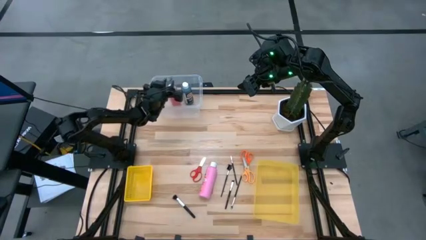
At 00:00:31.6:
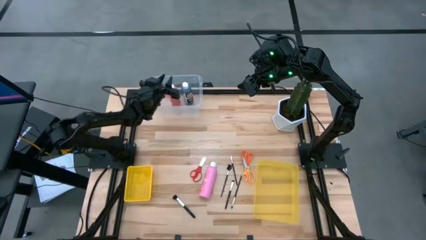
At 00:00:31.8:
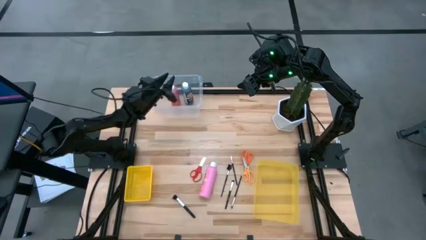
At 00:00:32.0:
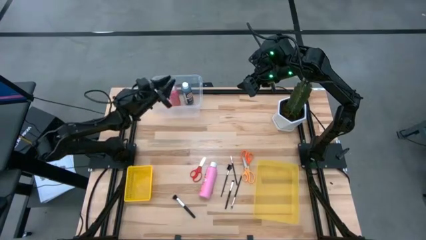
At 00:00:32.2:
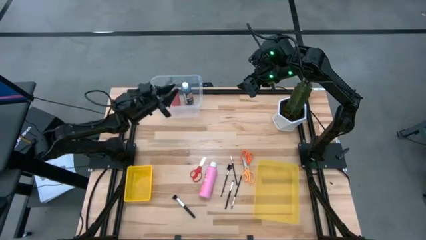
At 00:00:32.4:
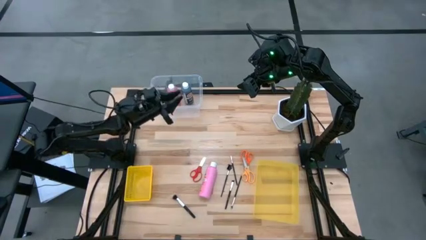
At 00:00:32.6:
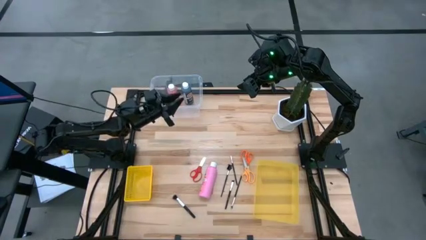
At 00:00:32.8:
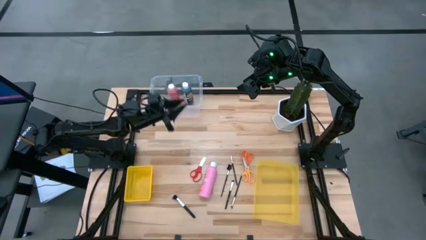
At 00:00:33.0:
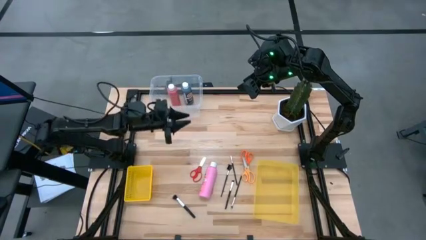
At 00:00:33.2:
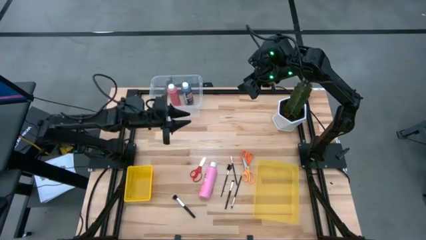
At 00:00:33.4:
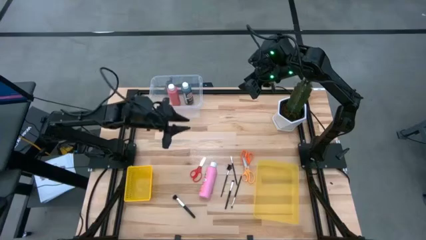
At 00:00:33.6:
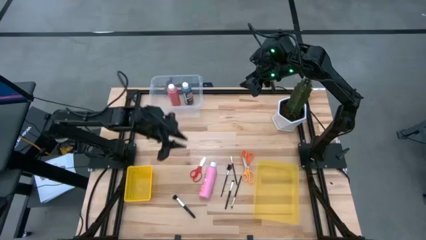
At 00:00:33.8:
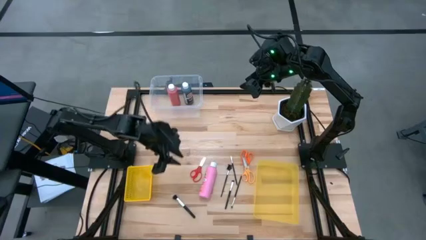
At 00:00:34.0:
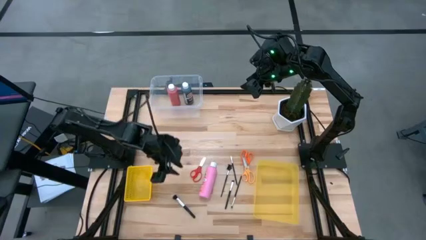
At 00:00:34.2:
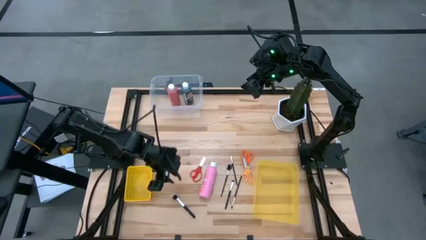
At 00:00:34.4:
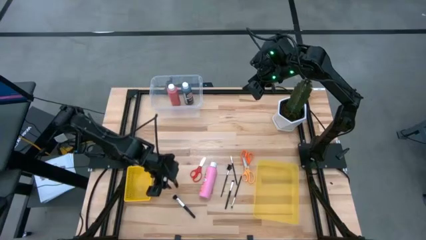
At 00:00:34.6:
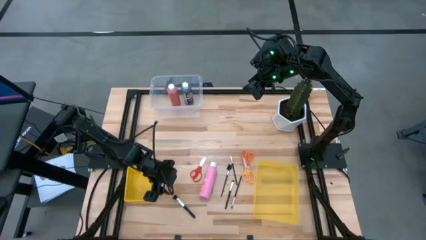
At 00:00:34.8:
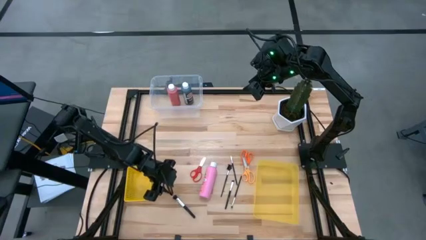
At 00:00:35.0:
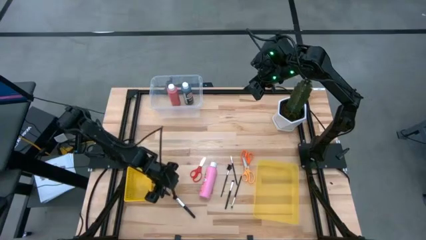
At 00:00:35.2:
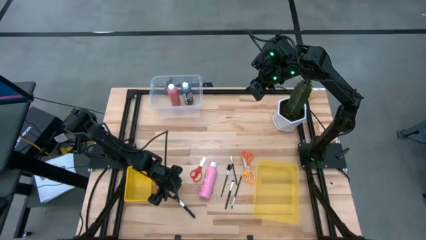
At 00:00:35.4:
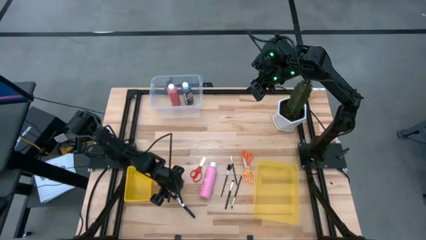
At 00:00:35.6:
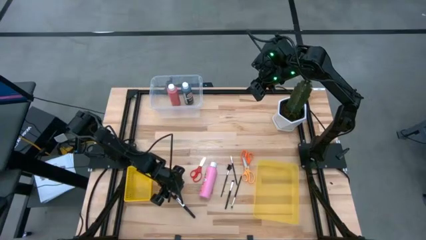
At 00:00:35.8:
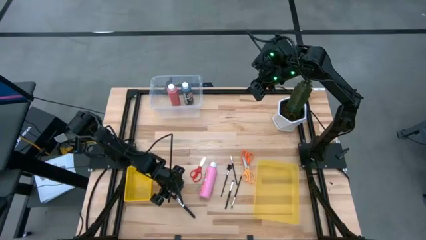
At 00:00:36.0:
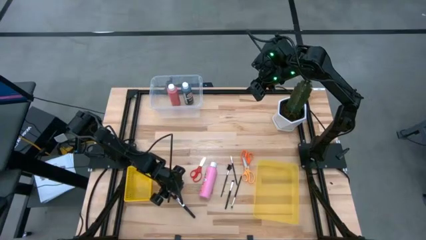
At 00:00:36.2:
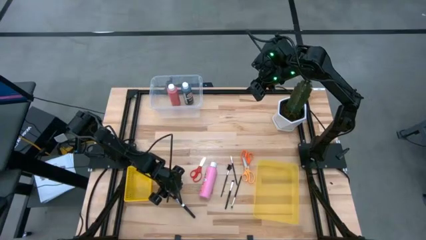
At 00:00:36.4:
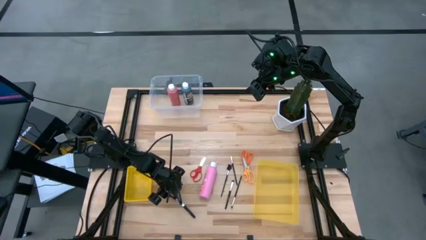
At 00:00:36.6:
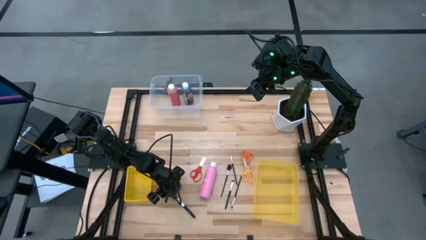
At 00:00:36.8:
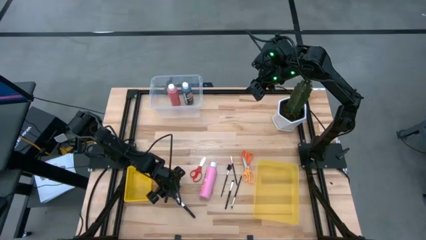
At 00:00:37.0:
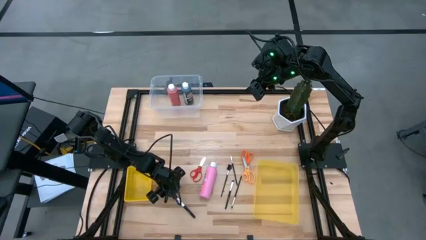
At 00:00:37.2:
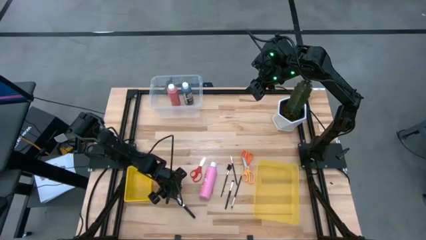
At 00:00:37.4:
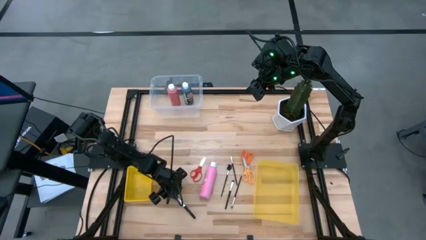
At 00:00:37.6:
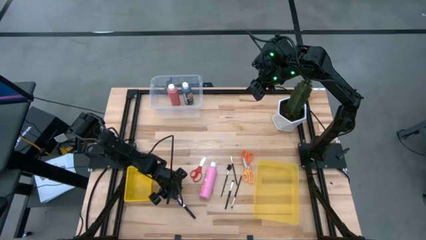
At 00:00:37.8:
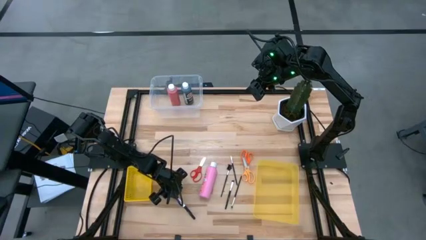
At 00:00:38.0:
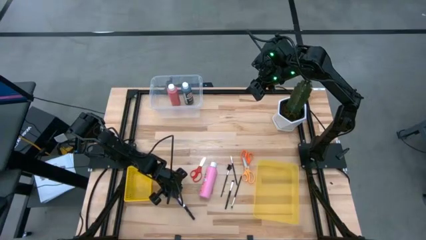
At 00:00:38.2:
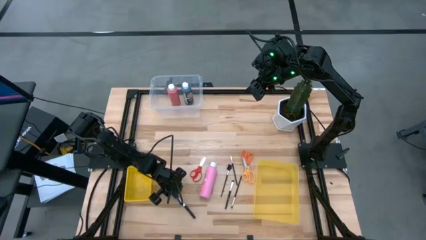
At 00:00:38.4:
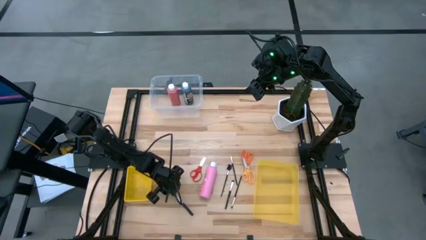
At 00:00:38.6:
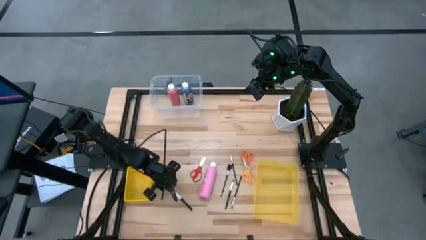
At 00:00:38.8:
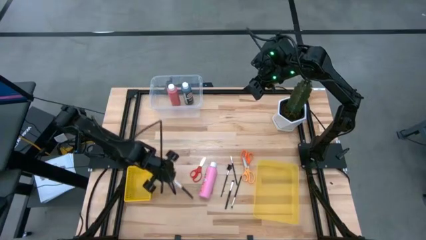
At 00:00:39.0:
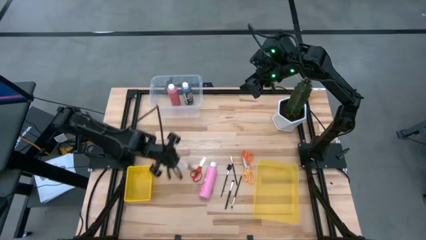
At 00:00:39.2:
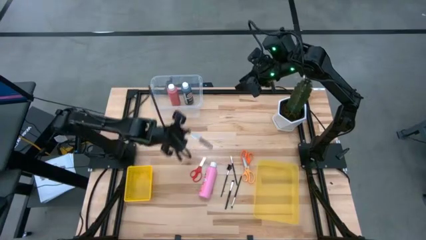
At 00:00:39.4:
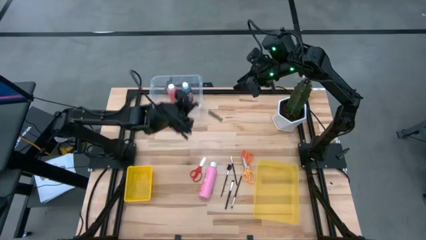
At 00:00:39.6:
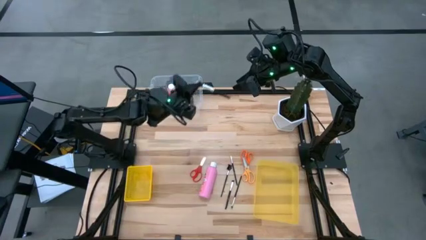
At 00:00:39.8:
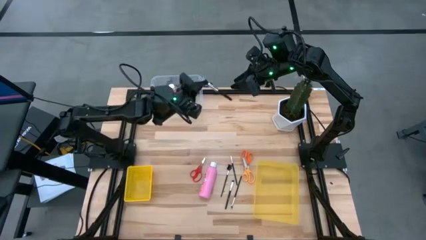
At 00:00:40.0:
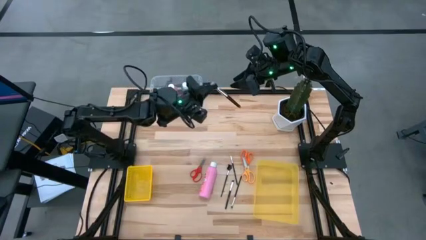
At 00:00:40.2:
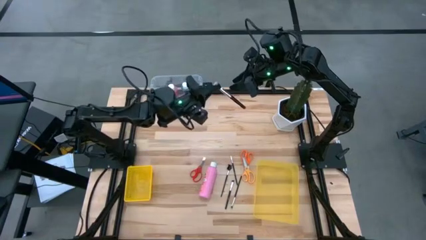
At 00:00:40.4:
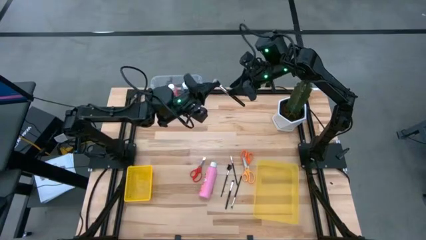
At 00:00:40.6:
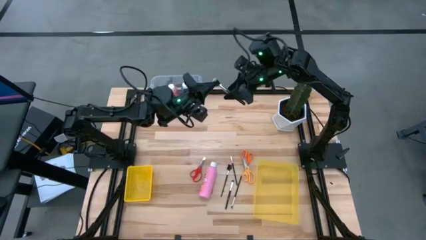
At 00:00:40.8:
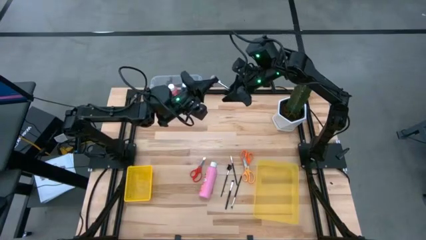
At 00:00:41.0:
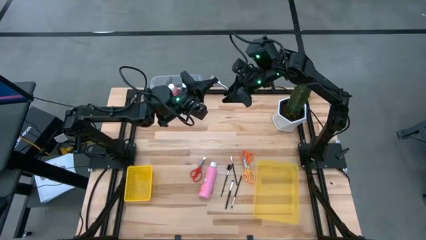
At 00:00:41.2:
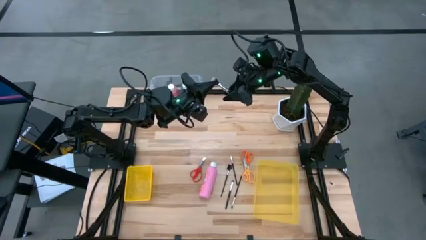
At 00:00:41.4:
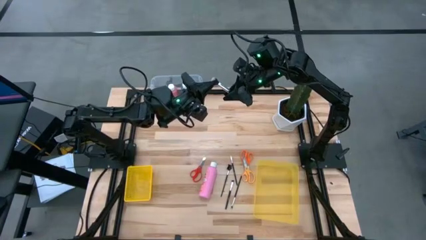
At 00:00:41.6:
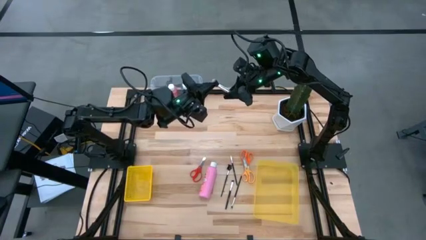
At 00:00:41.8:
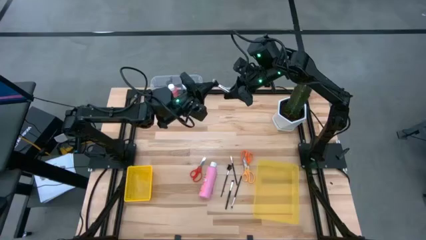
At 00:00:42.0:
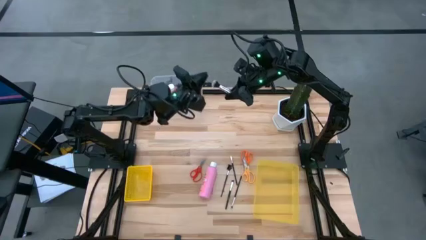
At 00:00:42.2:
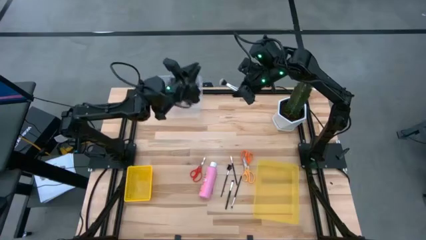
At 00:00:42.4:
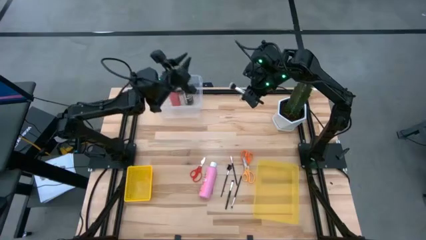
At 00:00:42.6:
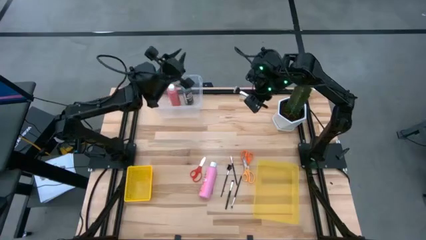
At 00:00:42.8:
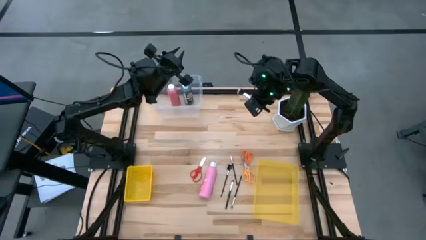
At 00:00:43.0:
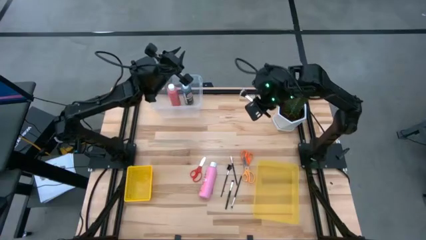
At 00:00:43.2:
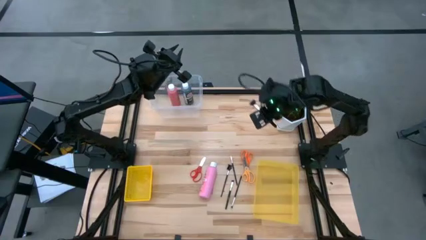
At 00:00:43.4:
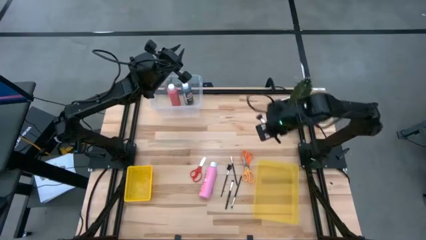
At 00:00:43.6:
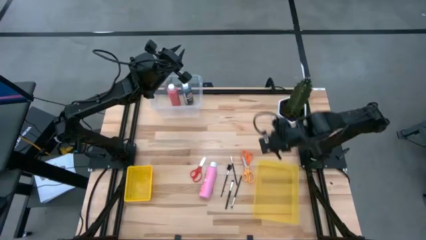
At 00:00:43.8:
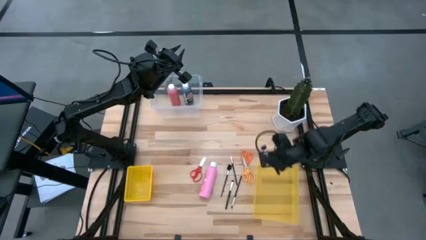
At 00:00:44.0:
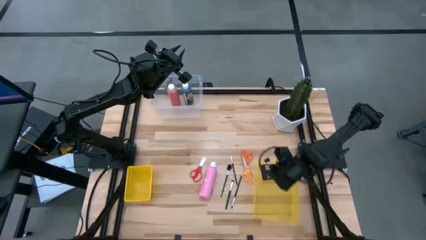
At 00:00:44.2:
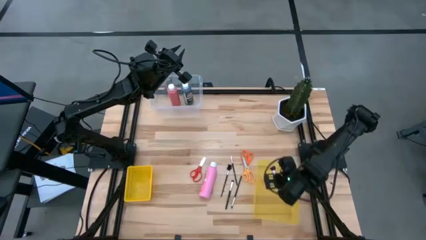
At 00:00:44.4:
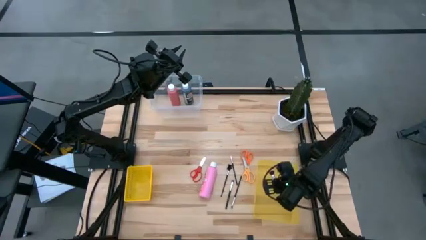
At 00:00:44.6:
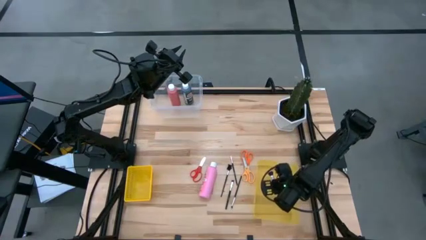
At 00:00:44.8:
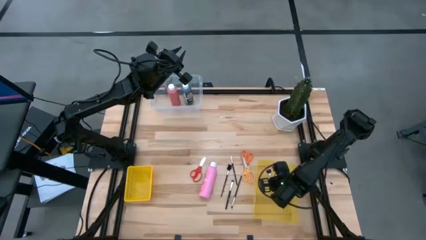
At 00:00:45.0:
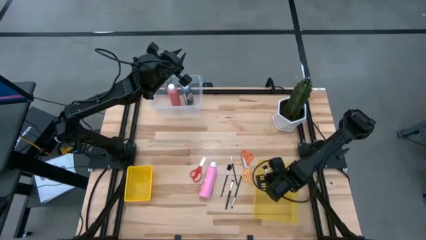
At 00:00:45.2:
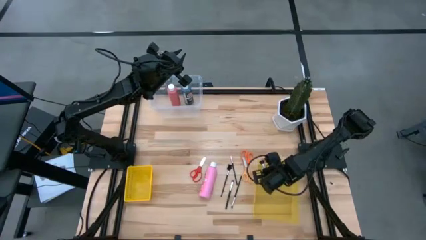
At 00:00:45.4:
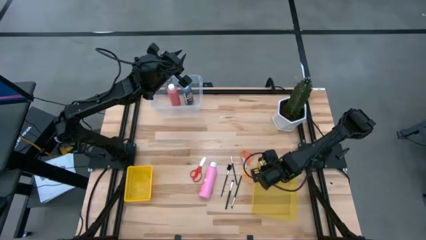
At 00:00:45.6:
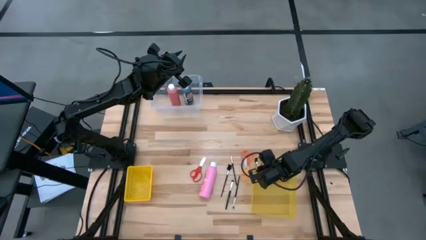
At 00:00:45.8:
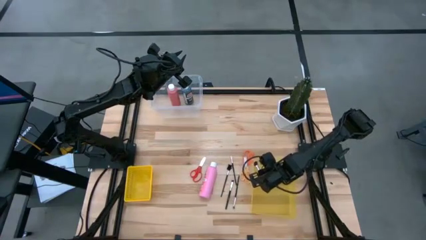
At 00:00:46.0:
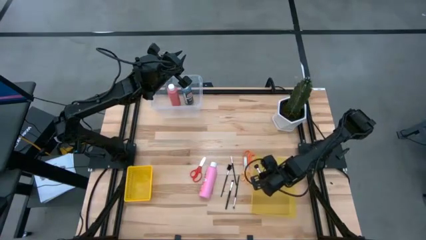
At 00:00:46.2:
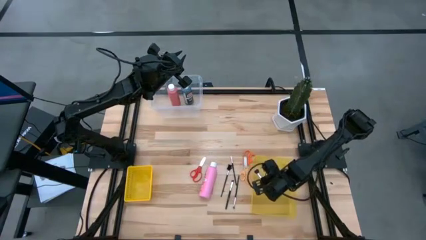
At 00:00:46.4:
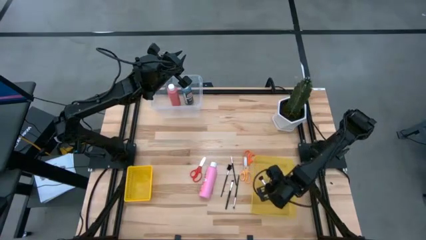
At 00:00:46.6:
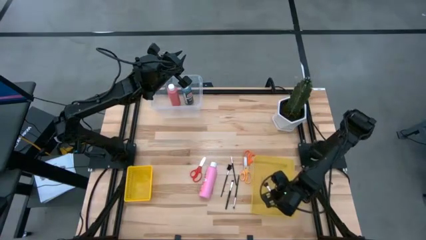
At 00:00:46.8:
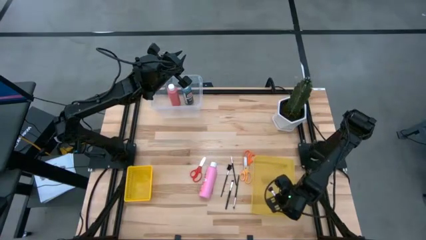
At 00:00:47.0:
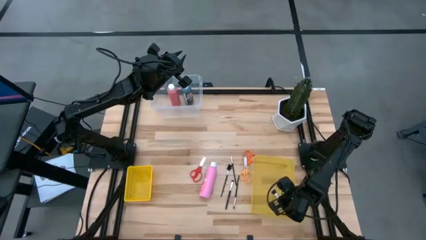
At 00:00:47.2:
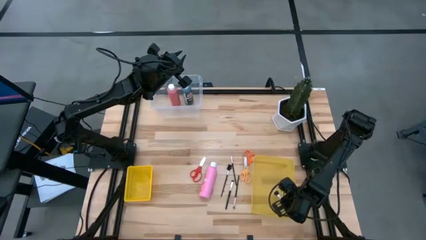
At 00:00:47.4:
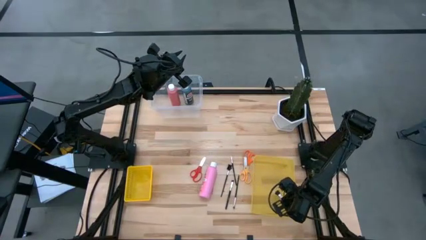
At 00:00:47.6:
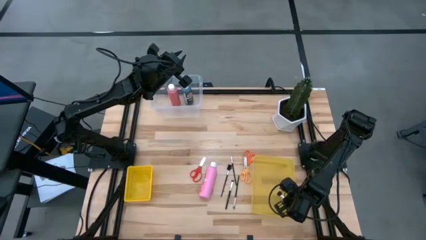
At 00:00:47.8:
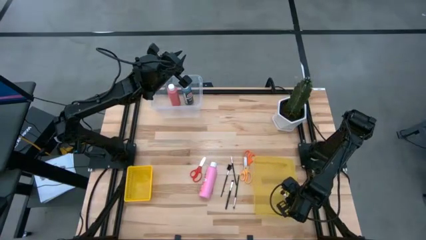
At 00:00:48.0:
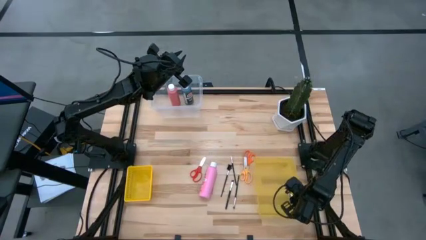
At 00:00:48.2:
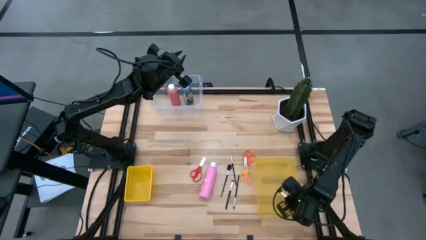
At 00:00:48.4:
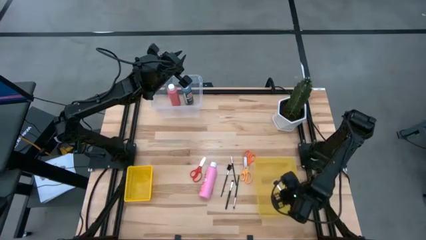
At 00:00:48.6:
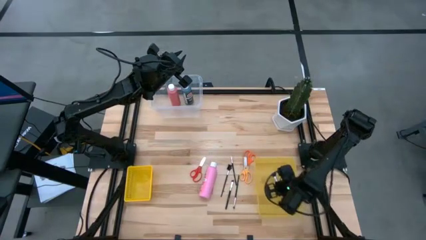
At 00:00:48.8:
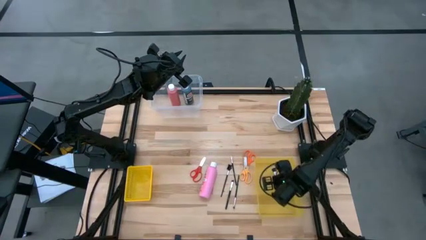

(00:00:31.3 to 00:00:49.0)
Task: Pick & Place Paint Supplies
Put the powder brush into the yellow bin
